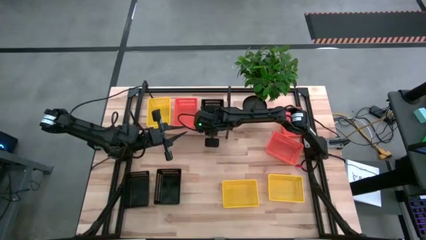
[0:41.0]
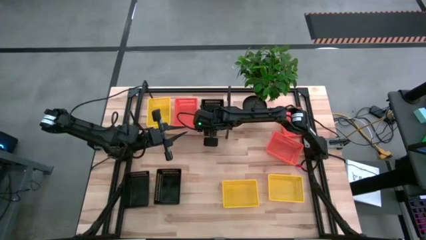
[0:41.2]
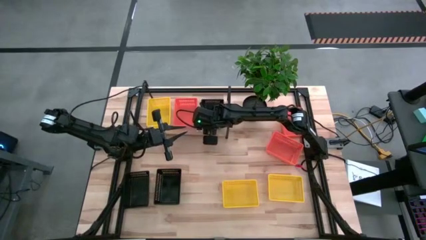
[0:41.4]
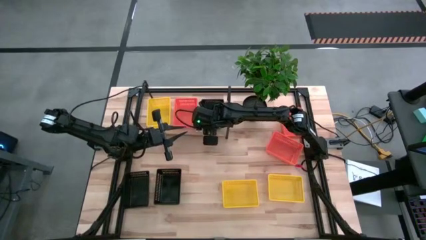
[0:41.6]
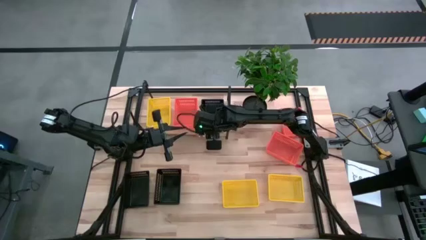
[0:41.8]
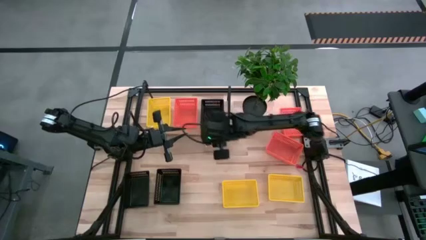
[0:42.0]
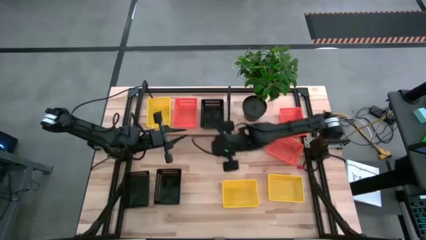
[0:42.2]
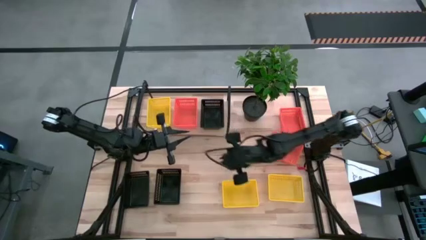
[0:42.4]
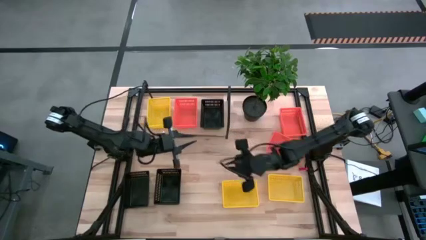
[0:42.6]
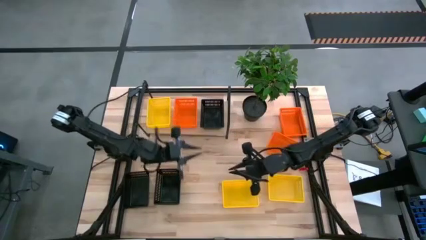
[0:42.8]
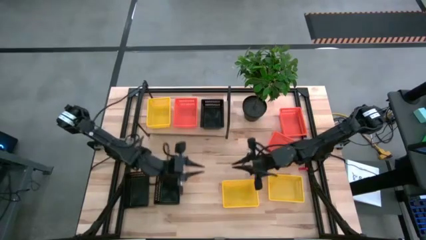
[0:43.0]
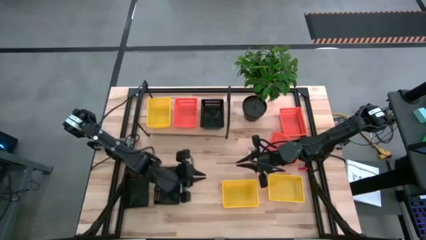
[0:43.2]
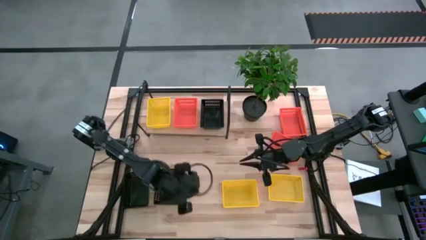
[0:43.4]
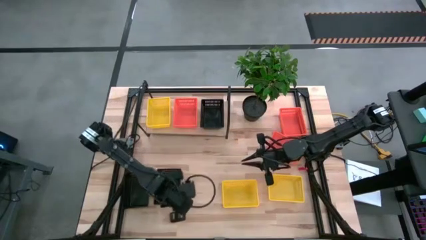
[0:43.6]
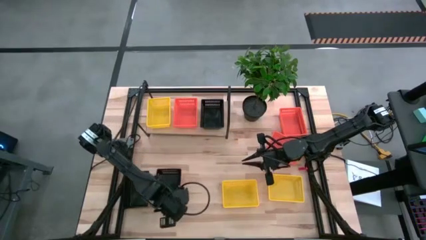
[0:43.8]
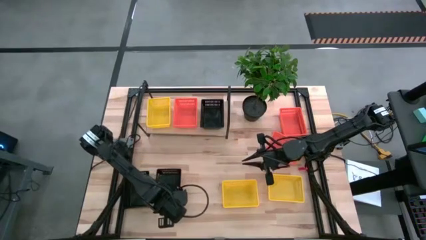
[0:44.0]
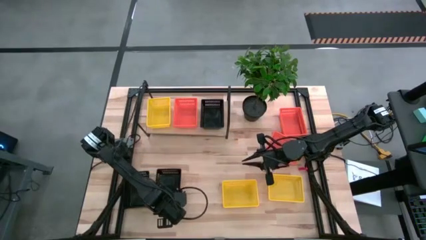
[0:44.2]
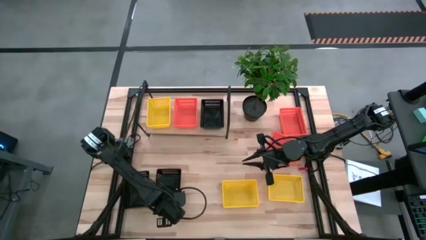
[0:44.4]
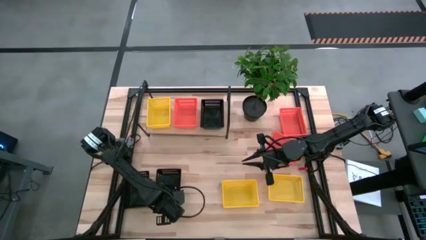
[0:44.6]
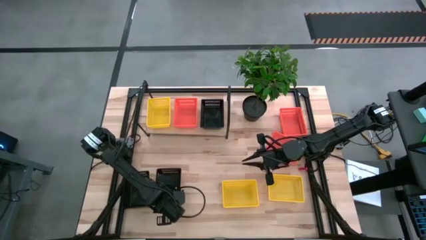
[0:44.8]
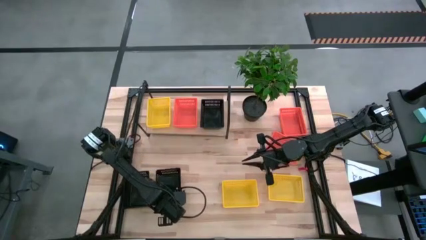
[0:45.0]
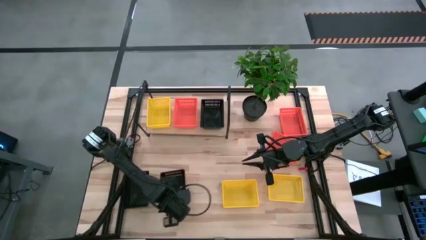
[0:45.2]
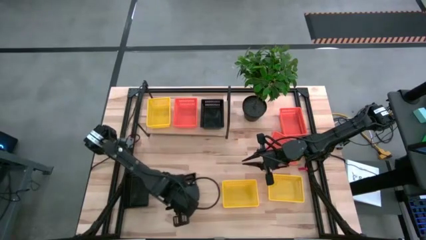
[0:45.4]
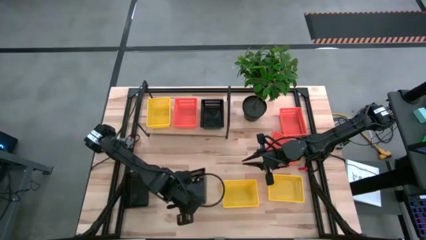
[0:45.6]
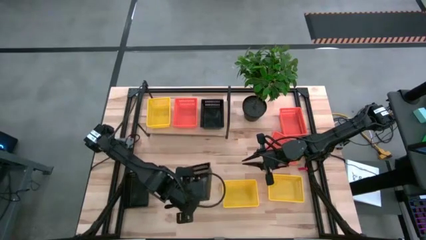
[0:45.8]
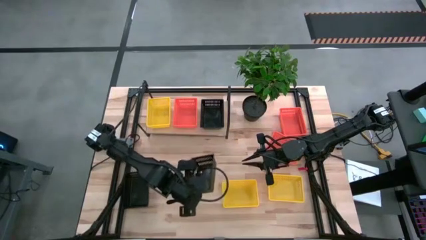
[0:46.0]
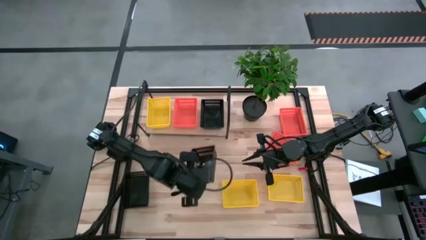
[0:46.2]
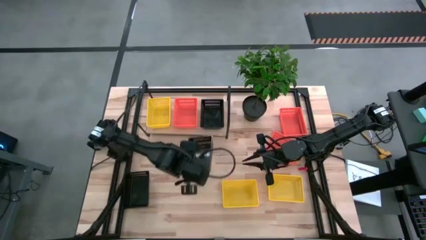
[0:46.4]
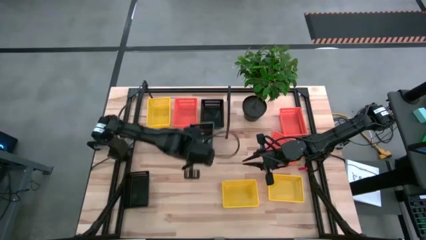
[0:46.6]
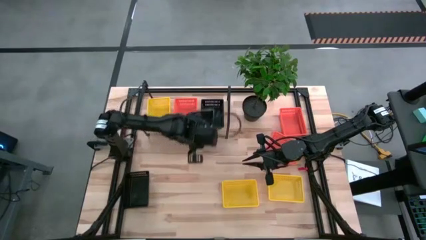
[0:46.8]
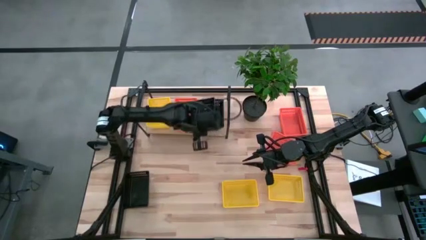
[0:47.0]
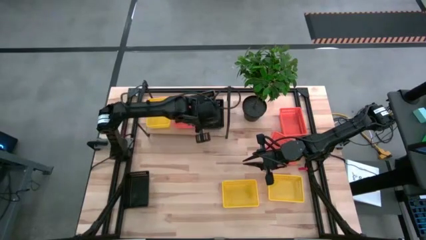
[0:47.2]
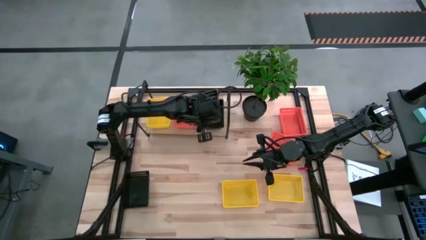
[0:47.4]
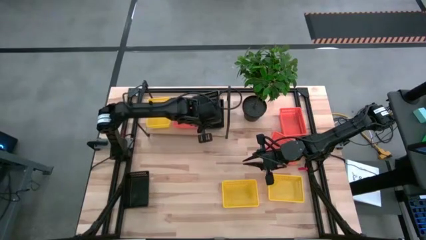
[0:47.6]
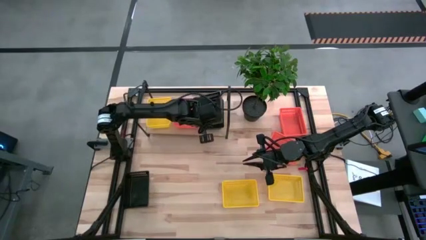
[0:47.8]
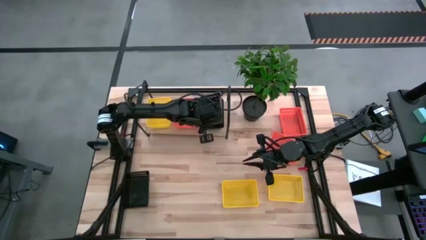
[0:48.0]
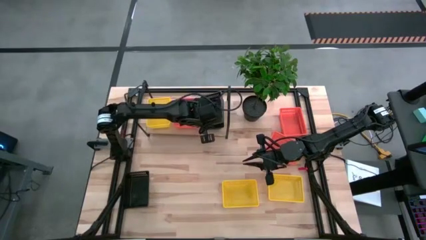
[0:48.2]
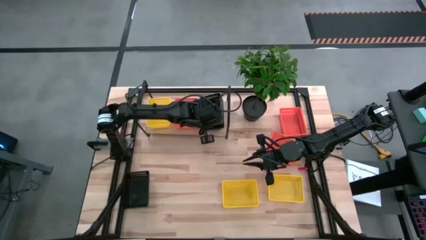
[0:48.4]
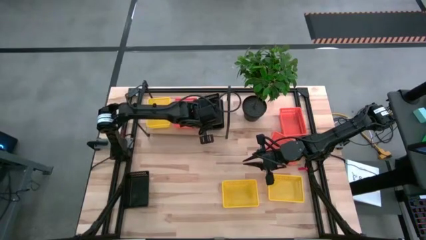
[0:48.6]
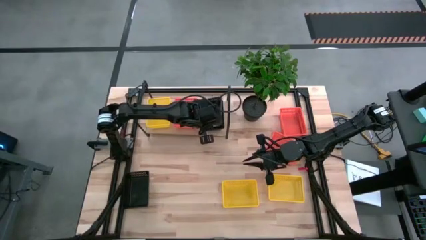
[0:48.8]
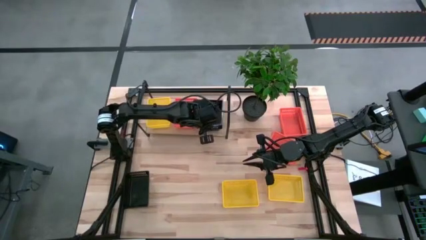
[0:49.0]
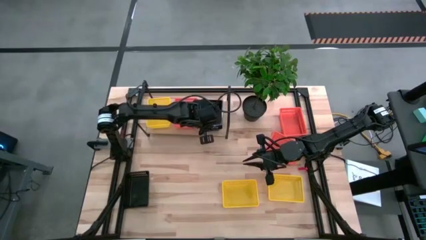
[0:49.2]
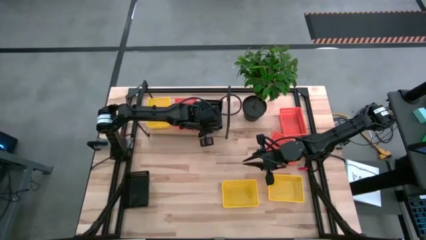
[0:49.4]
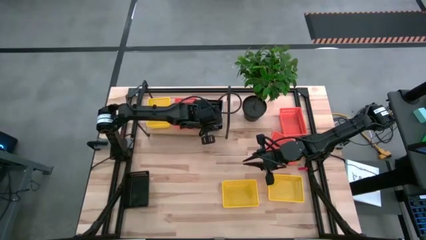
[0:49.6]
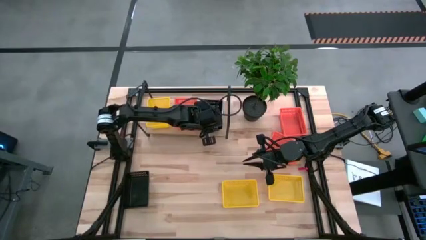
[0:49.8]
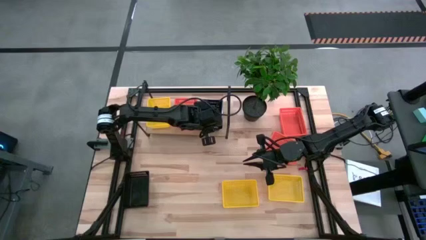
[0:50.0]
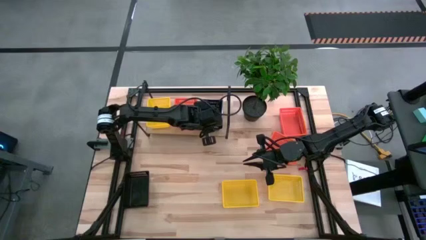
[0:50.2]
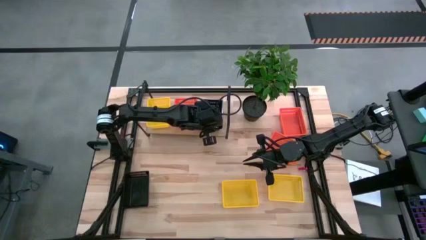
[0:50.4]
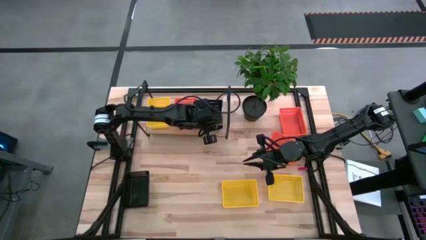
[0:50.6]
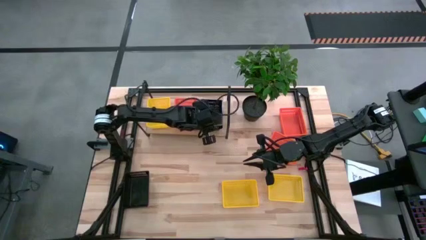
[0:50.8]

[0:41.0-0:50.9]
Task: Stack baskets on shelf by color
Stack the right black basket on the black basket on the shelf

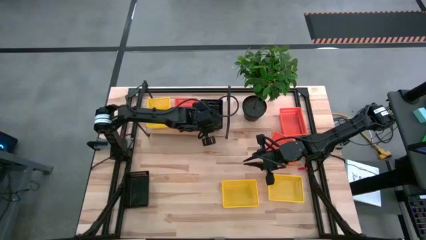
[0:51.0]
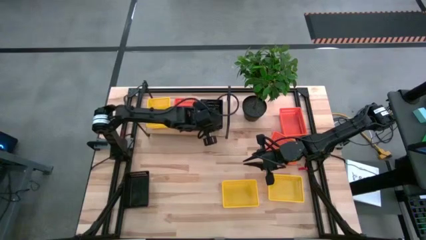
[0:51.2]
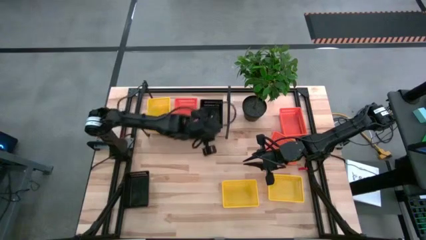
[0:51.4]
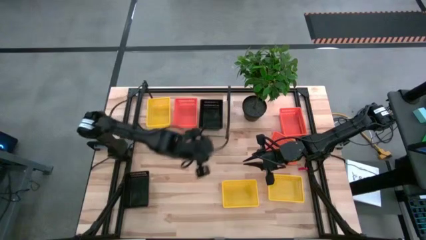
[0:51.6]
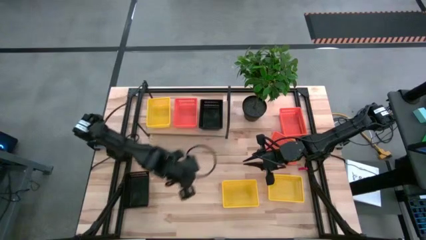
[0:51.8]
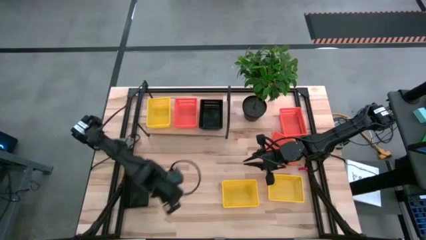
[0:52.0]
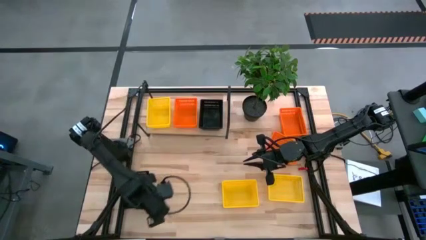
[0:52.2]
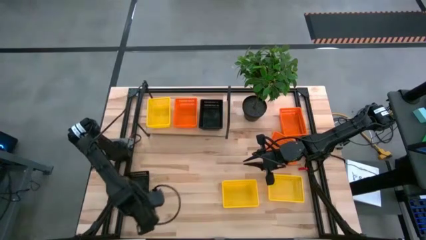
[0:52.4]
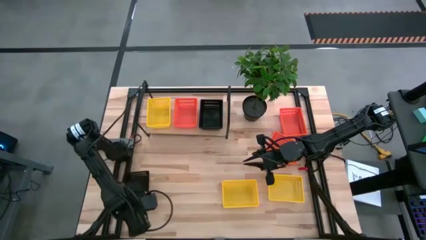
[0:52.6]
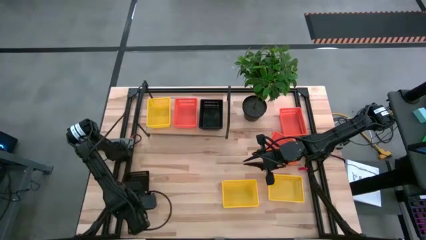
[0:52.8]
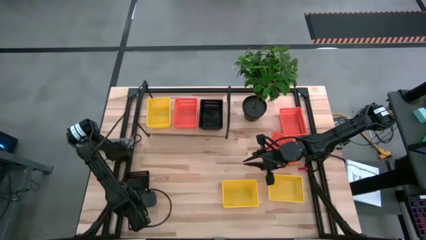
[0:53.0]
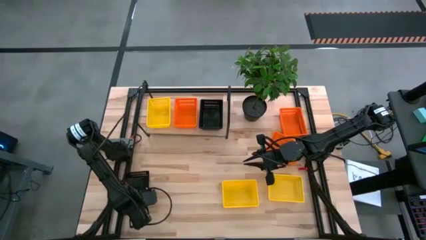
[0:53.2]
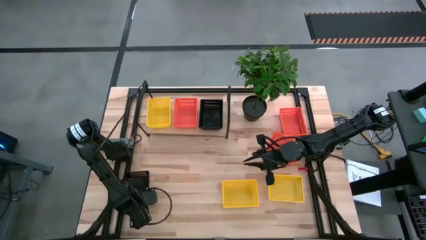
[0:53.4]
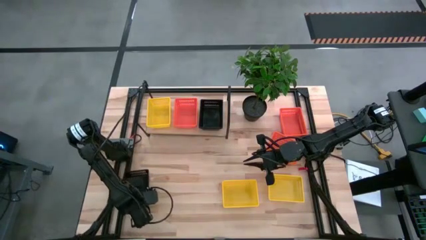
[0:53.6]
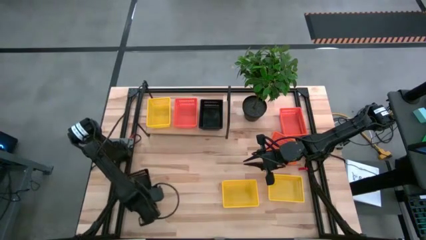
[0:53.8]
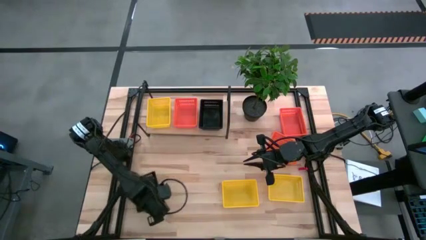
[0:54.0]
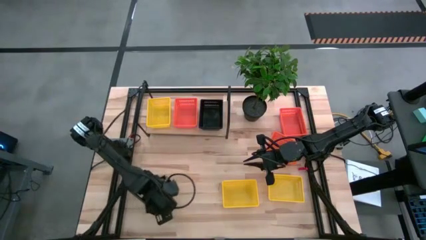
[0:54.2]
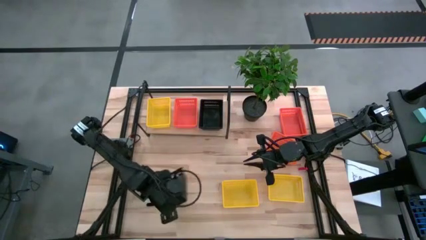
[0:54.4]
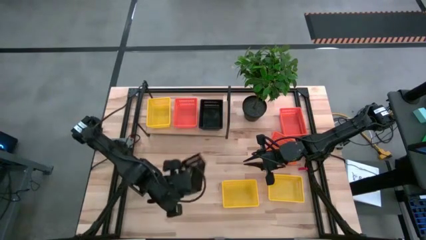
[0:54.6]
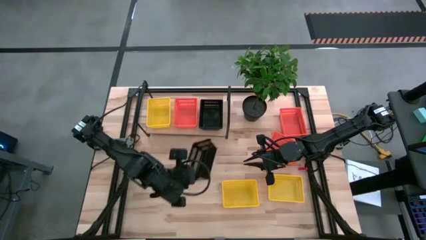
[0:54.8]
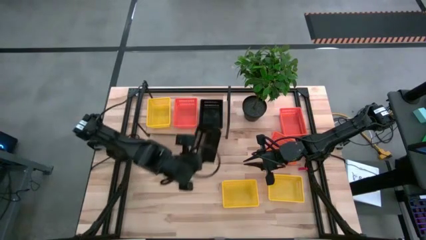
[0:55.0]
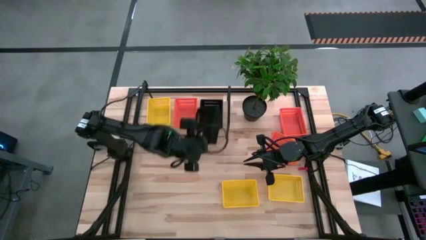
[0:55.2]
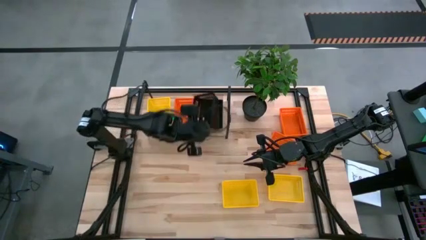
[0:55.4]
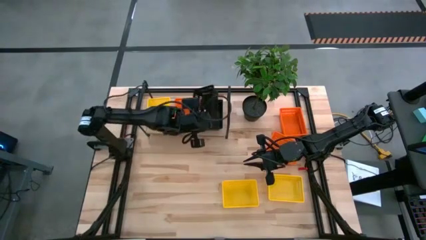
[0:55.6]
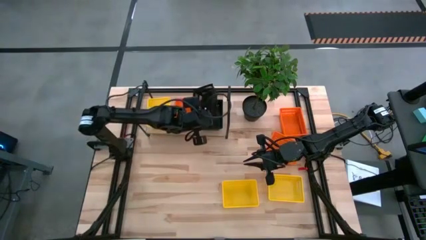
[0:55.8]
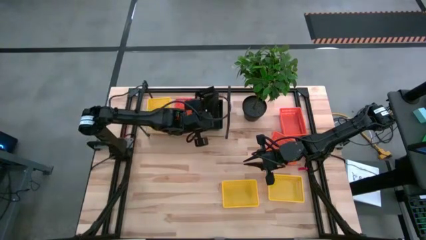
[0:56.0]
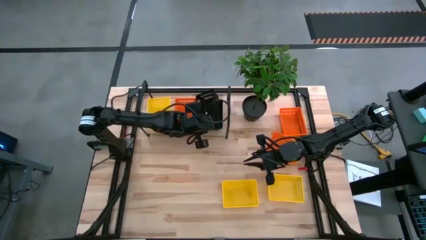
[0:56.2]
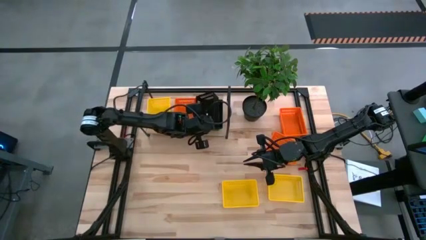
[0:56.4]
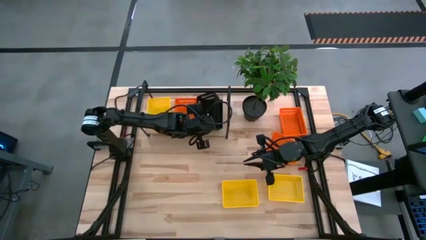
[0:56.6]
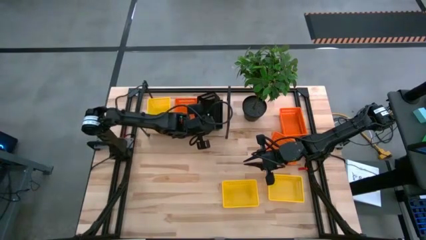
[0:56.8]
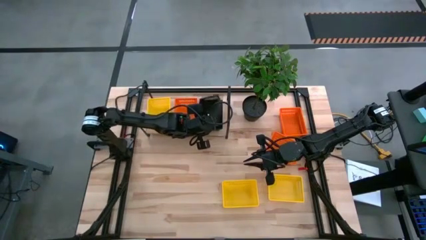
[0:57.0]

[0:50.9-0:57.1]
Stack the black basket on the black basket on the shelf
